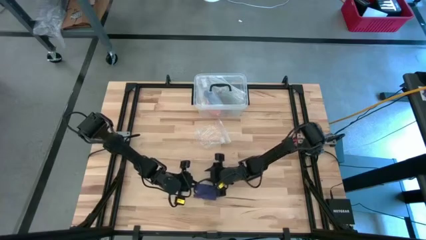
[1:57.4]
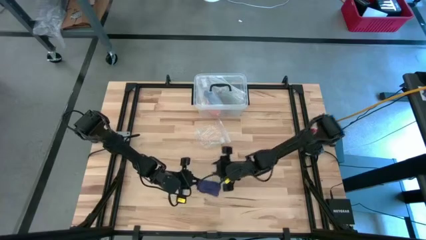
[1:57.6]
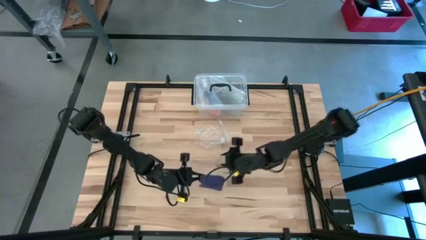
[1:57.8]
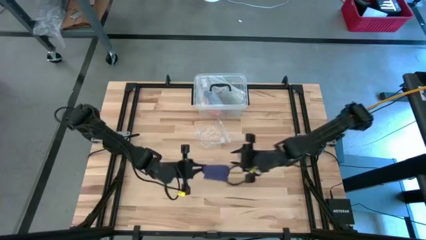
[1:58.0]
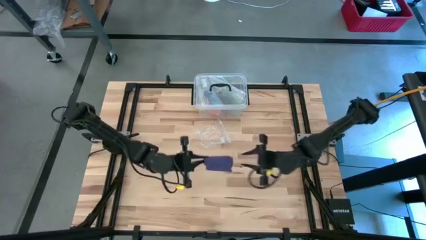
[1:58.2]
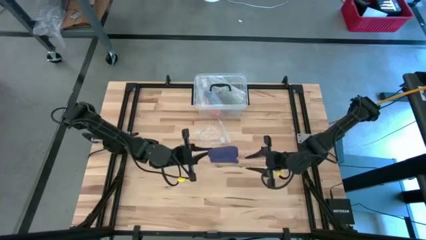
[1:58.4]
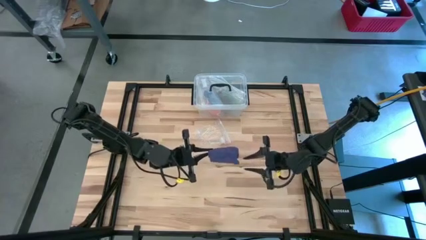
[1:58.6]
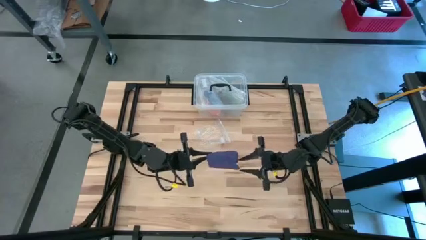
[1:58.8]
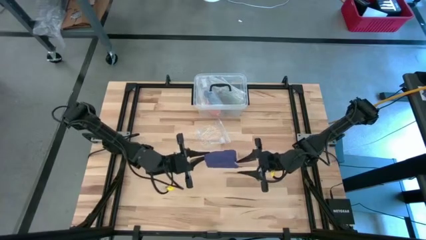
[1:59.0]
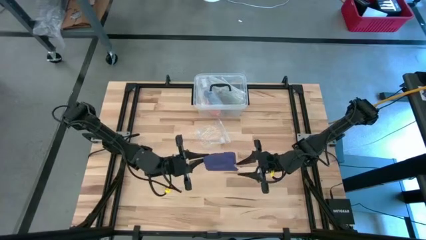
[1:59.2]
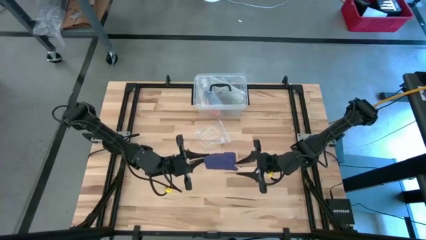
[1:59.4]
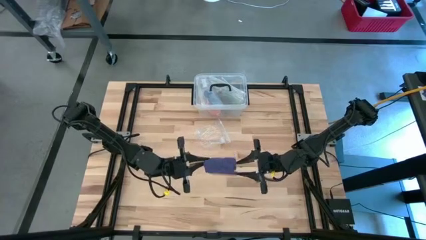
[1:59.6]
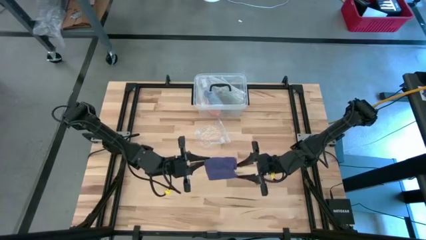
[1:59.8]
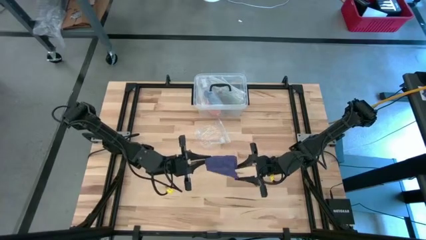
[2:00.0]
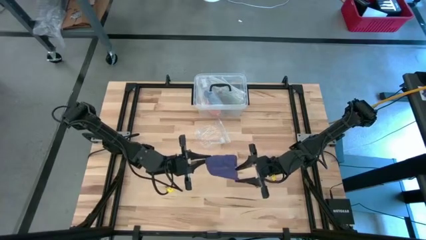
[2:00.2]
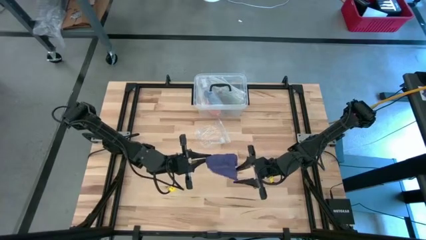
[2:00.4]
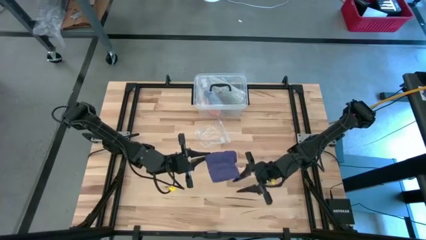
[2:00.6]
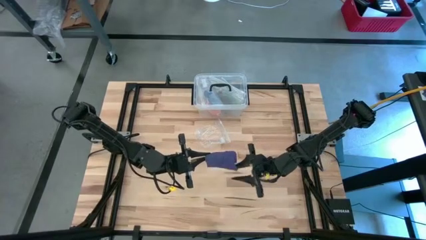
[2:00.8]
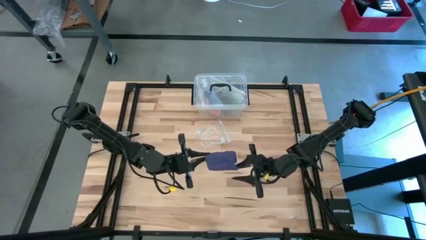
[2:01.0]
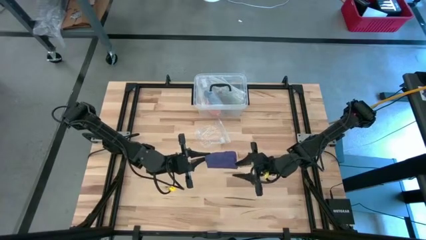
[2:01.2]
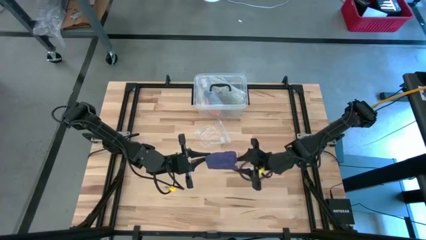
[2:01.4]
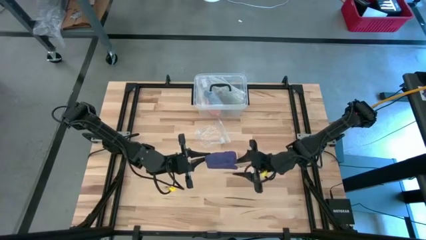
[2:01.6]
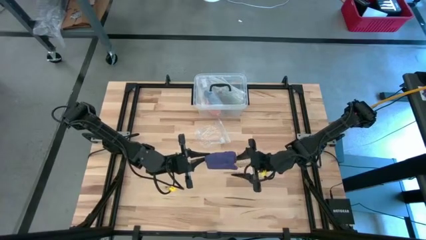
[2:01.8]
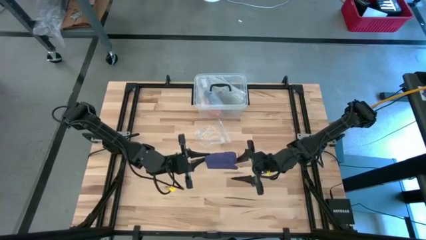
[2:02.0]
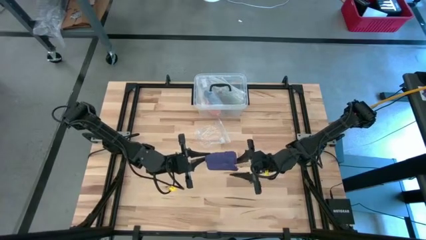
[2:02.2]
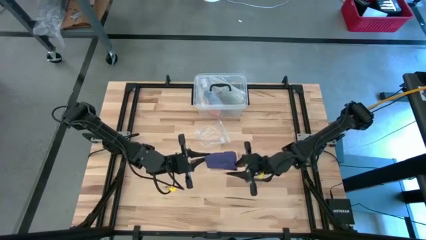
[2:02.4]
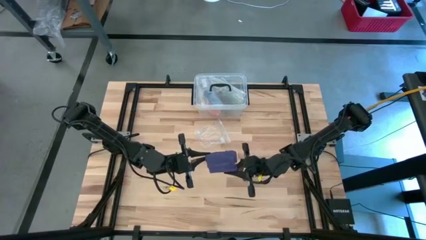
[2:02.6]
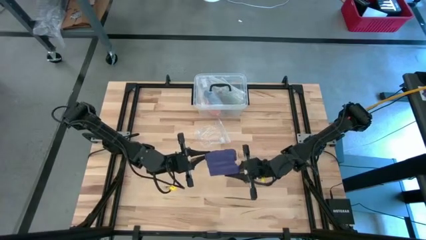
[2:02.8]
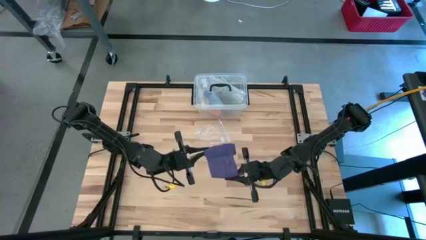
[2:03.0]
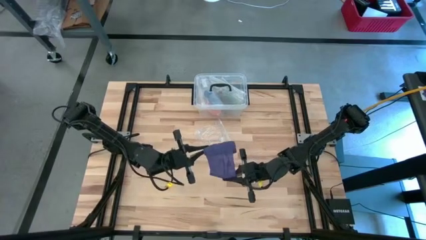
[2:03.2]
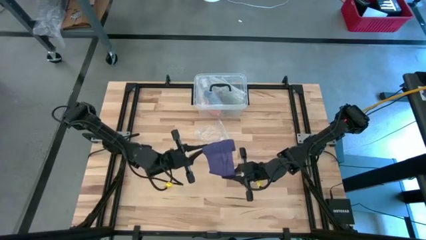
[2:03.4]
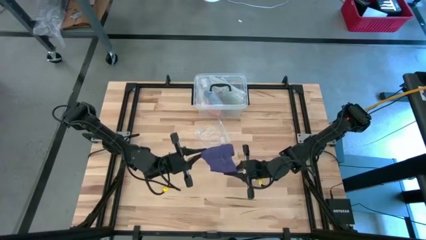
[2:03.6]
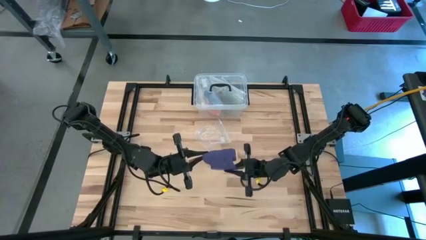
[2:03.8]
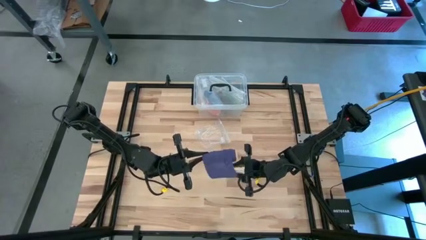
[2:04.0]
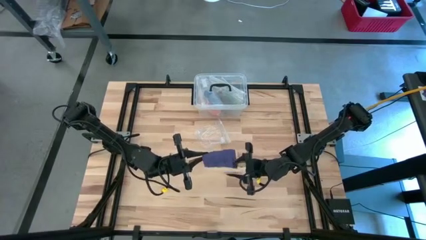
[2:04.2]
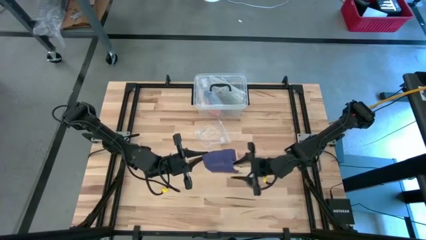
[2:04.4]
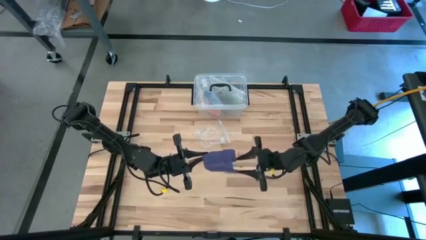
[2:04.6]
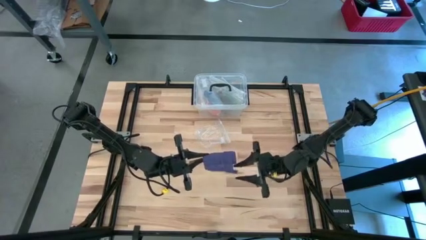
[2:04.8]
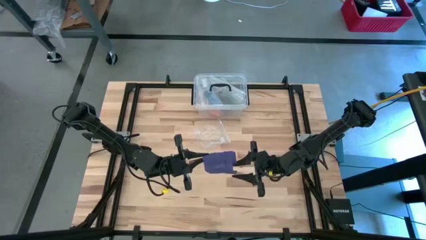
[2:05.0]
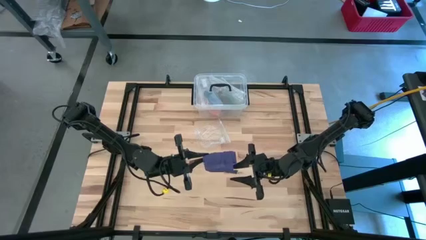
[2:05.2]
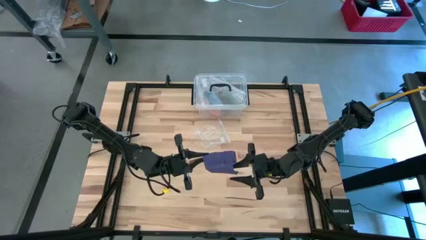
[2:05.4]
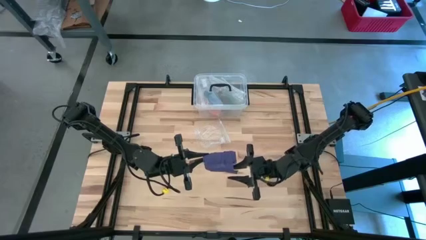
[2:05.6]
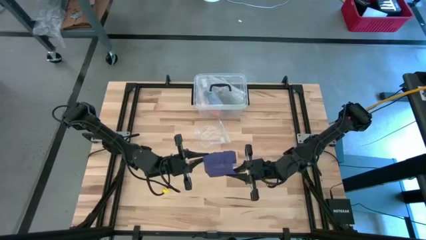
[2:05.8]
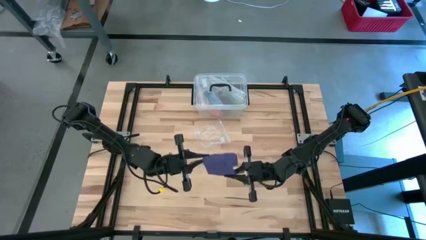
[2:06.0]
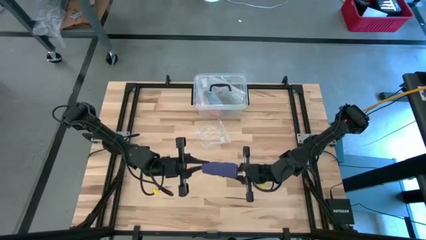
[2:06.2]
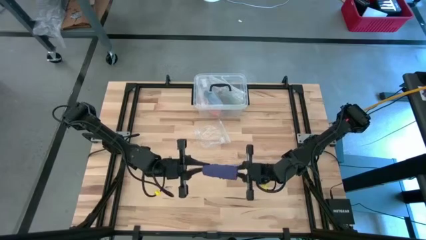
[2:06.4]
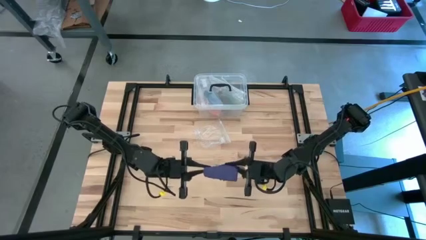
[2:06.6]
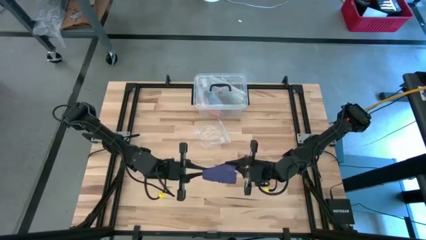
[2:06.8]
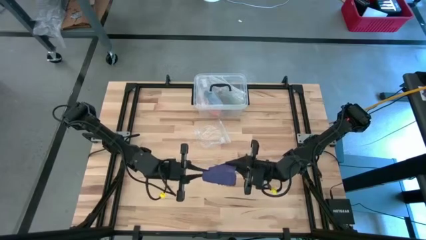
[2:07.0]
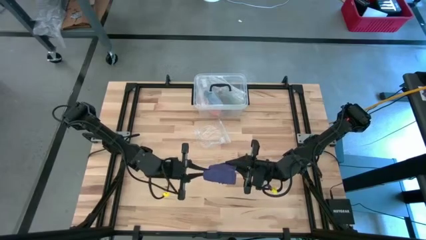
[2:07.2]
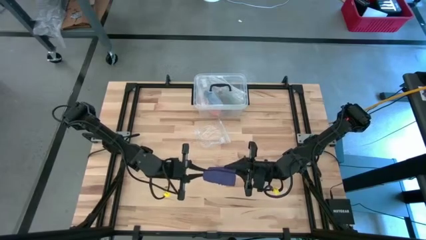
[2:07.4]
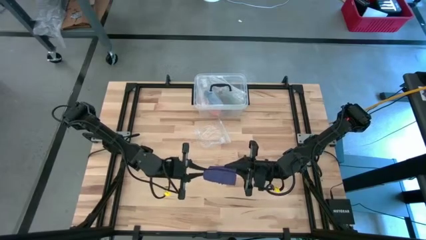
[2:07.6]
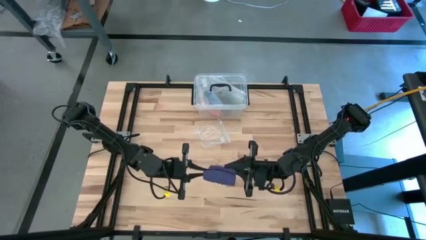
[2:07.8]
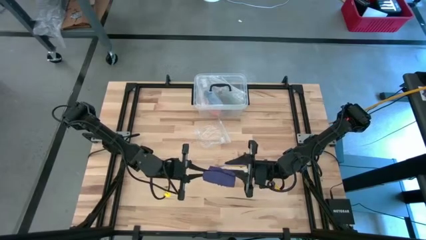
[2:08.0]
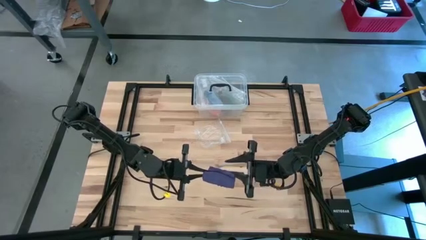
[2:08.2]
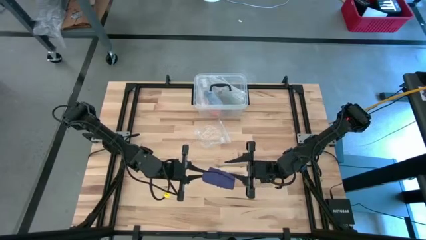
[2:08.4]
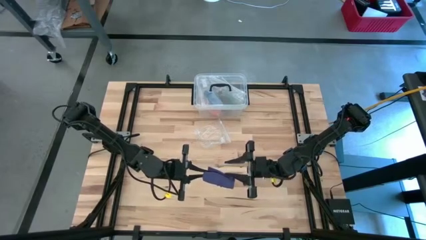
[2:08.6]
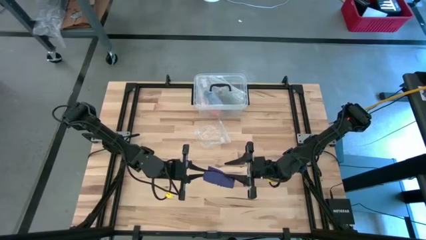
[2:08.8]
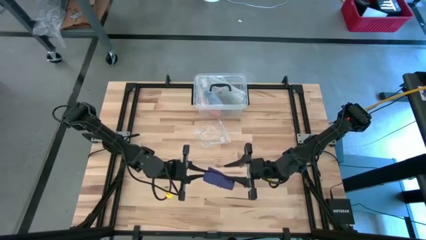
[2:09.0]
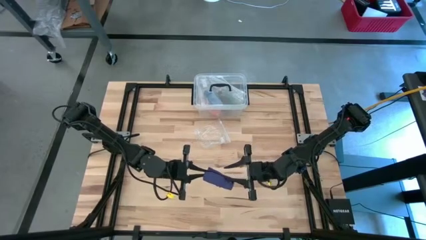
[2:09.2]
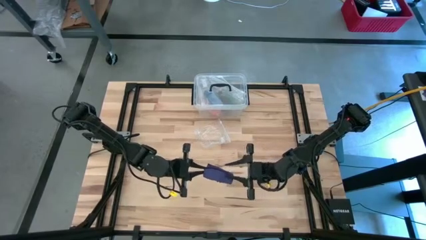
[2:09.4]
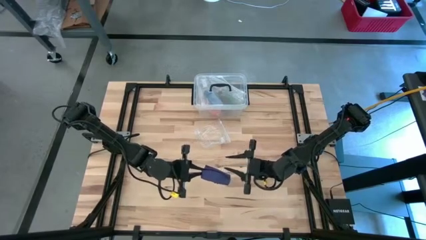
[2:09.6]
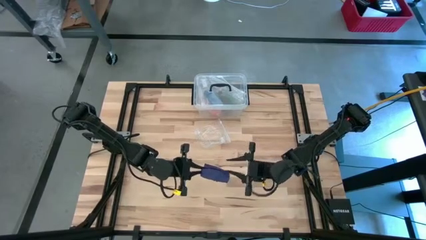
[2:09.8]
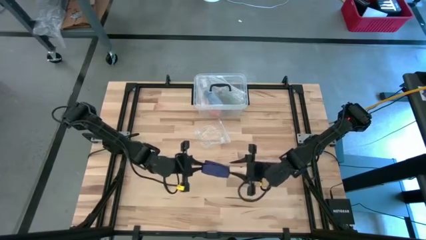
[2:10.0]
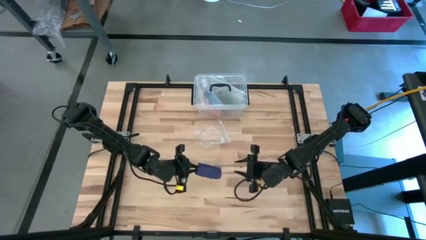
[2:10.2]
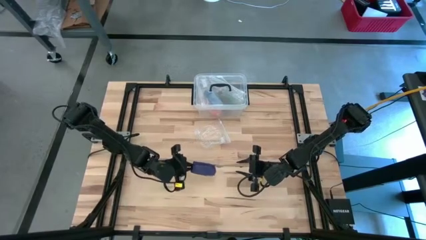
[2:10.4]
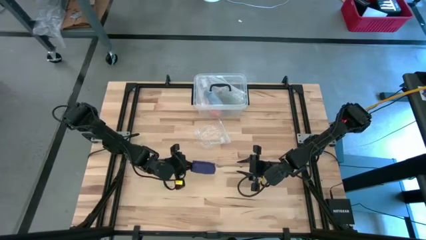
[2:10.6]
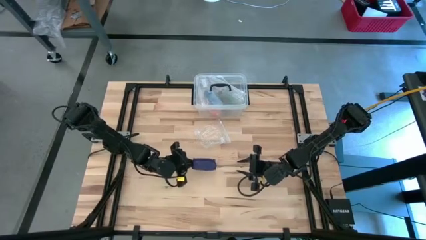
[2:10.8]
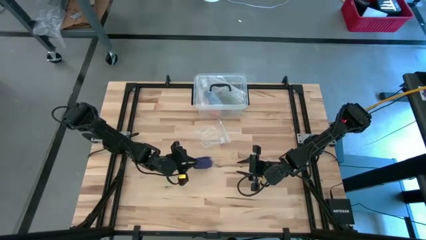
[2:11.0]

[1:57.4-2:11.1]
Task: Roll bandage
Roll the blue bandage

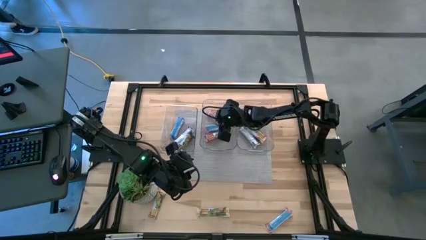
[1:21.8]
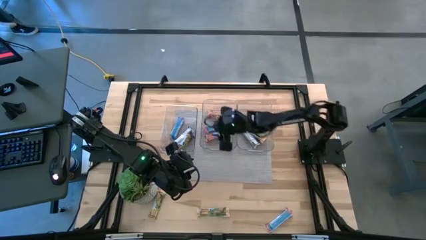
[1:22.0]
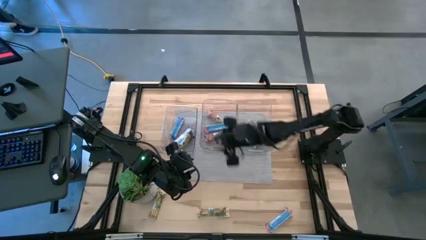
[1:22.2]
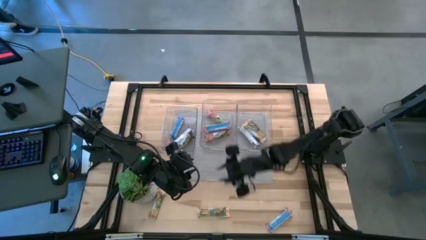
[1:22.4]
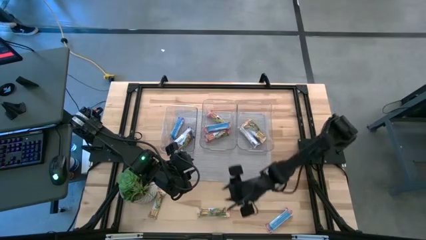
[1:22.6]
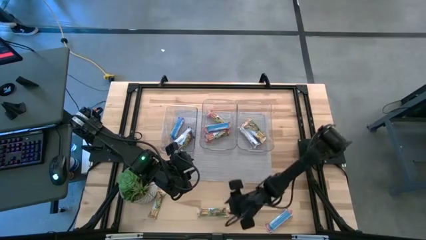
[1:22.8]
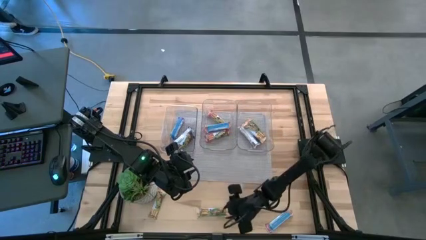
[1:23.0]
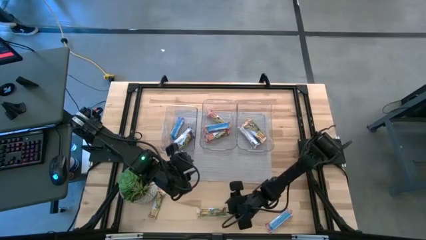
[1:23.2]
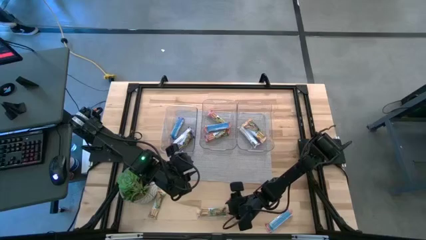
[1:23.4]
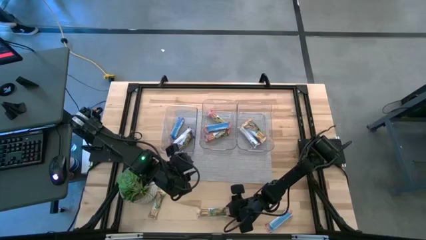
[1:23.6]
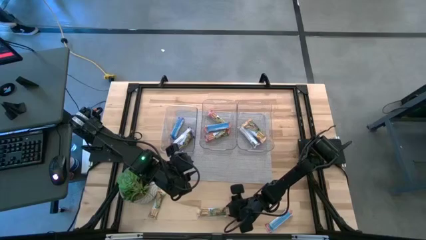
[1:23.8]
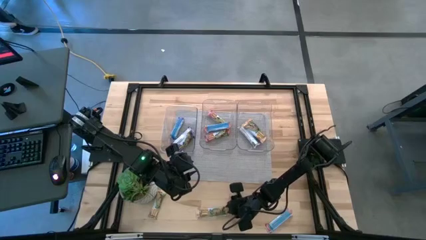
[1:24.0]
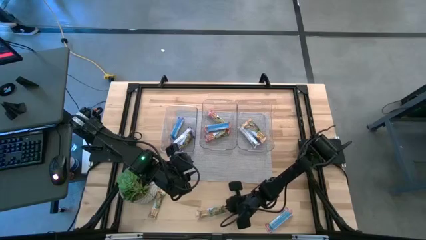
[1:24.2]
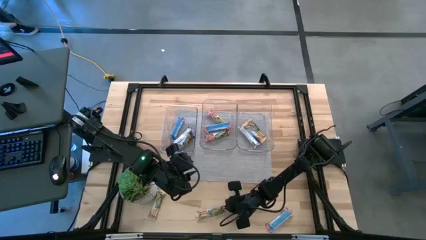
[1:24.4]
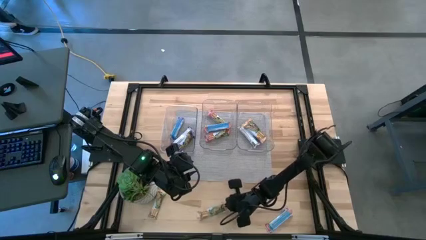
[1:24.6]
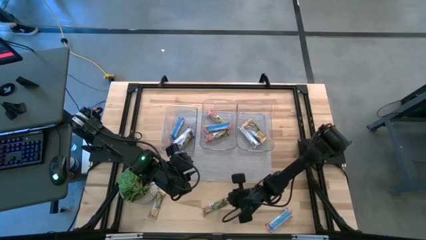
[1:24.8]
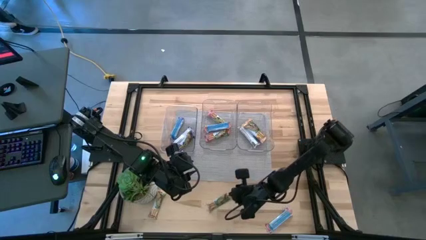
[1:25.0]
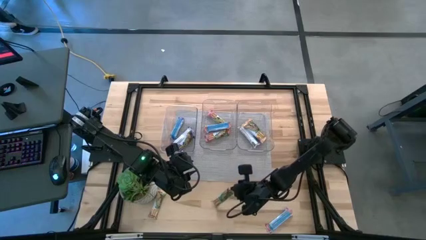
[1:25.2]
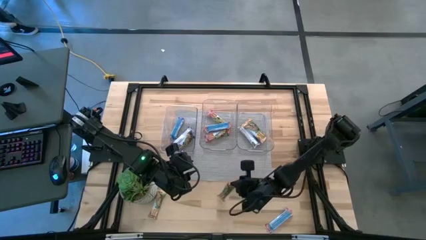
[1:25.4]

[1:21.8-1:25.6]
Task: Pick and place Granola Bars by type
Put the orange granola bar into the middle transparent bin
